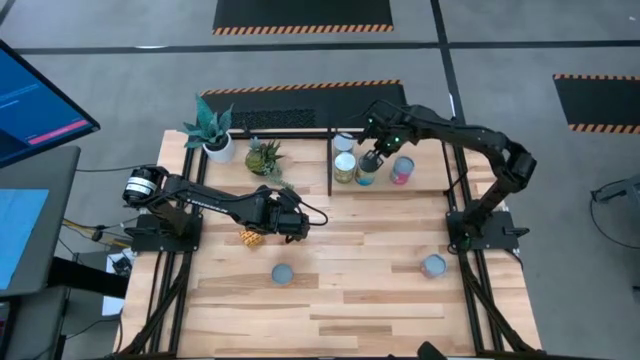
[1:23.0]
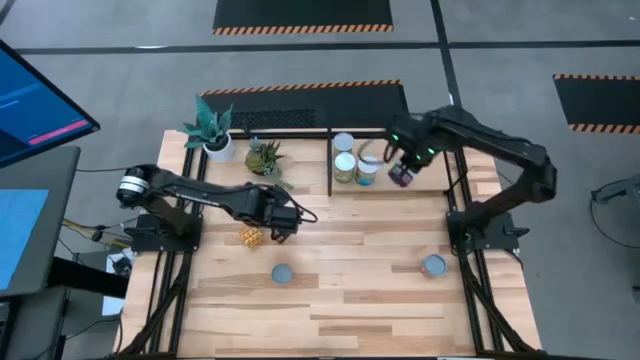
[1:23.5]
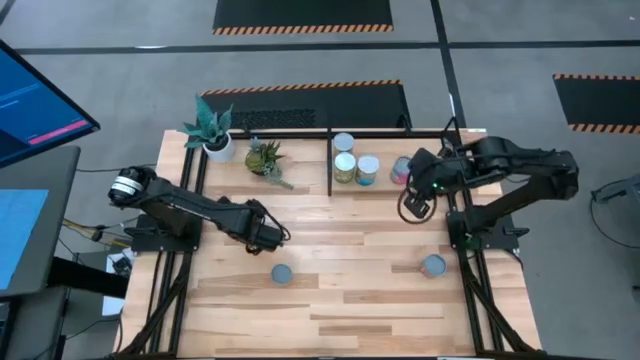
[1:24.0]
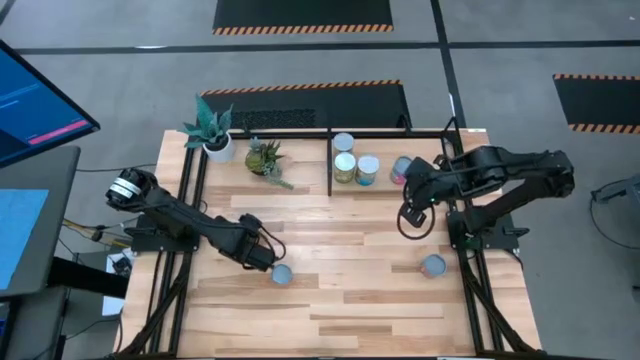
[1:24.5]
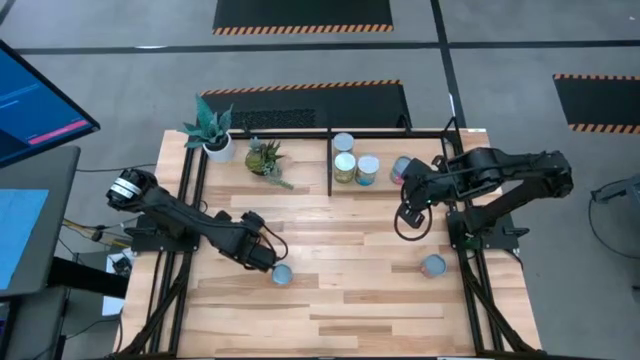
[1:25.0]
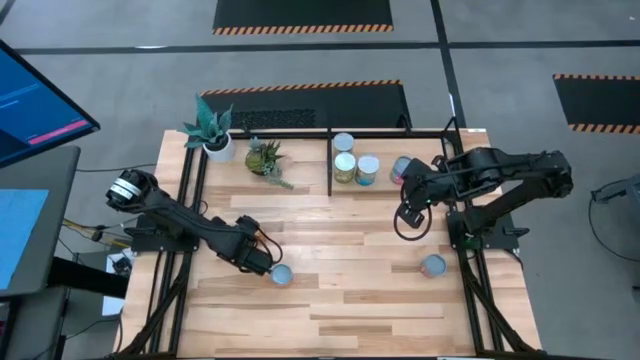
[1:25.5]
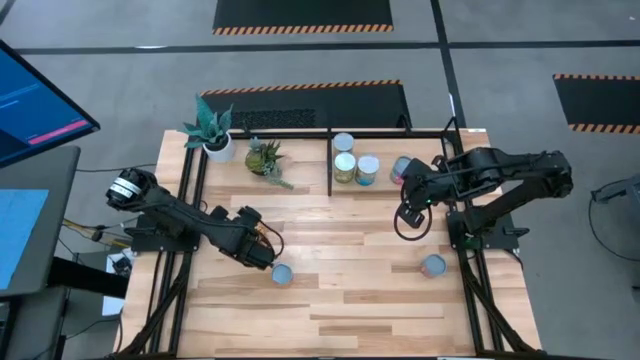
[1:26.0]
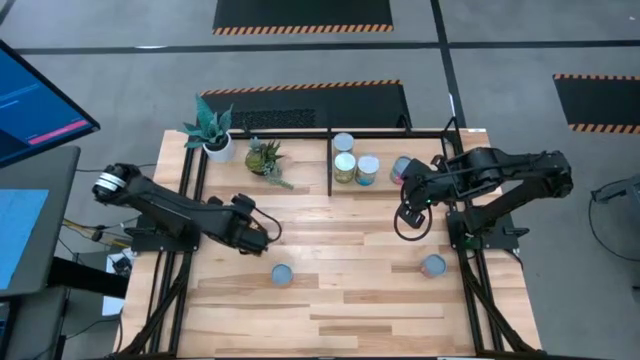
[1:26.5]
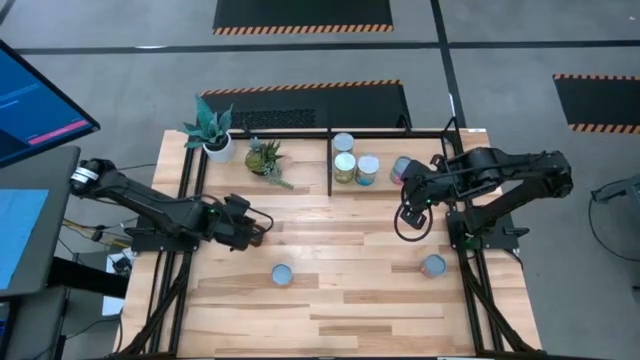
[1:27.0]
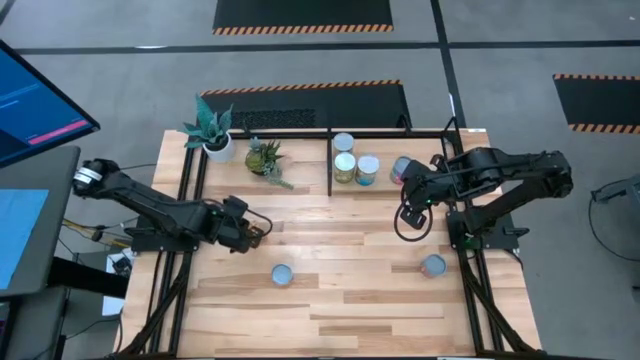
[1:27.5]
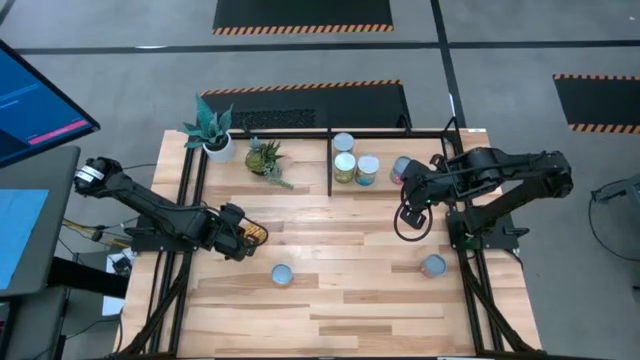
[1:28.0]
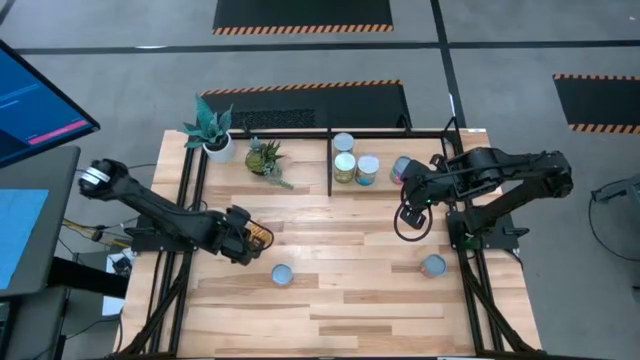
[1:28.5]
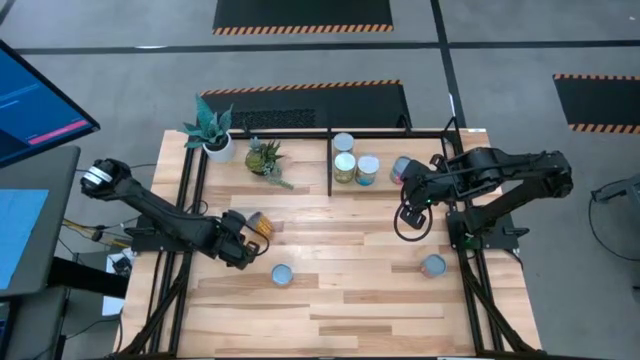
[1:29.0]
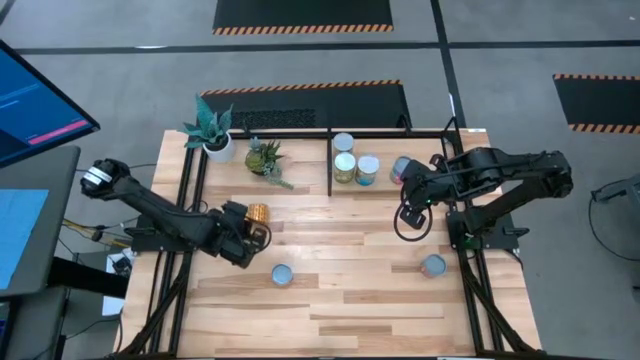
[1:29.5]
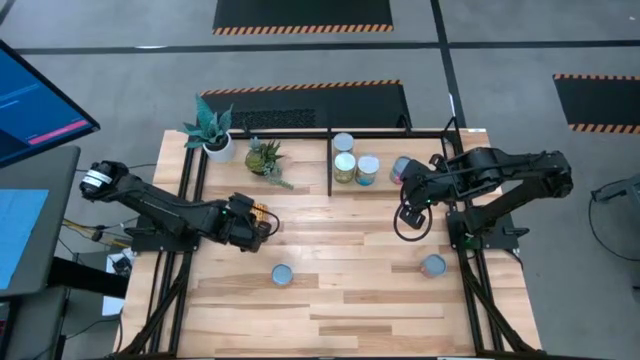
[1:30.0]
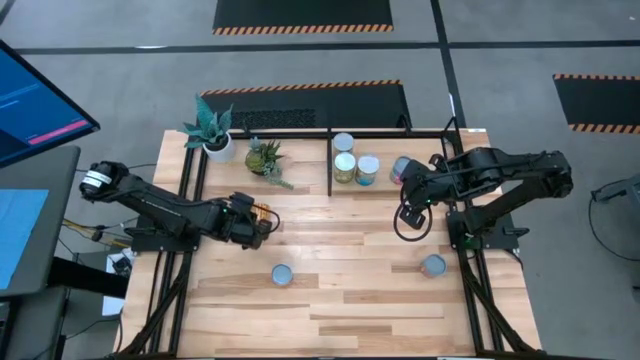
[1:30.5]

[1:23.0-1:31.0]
Task: Pick and place cans onto a shelf
Put the canned black beans on the shelf

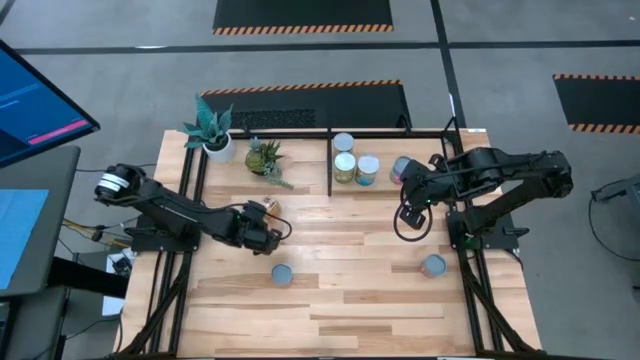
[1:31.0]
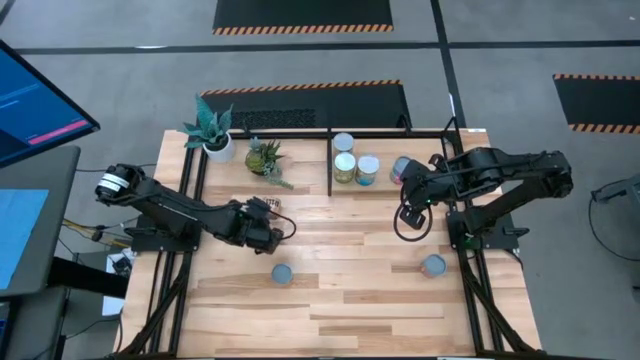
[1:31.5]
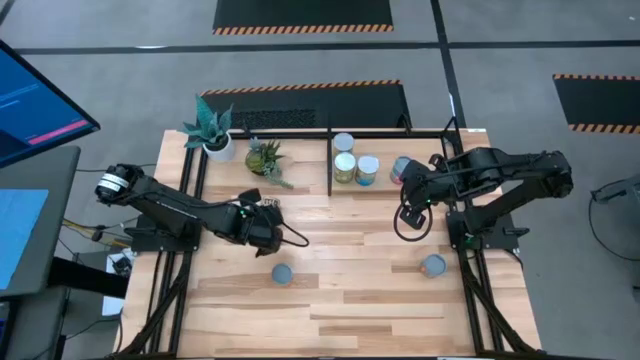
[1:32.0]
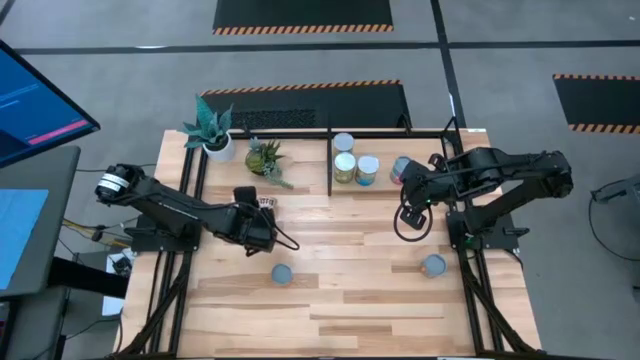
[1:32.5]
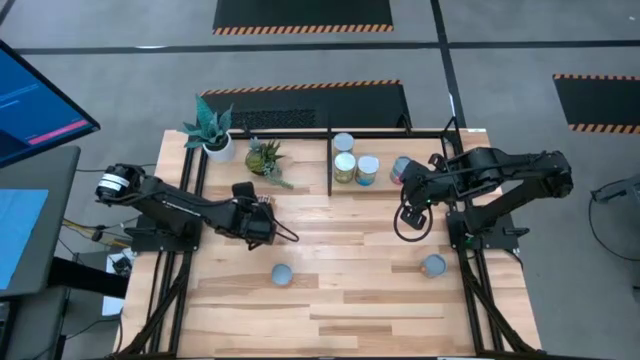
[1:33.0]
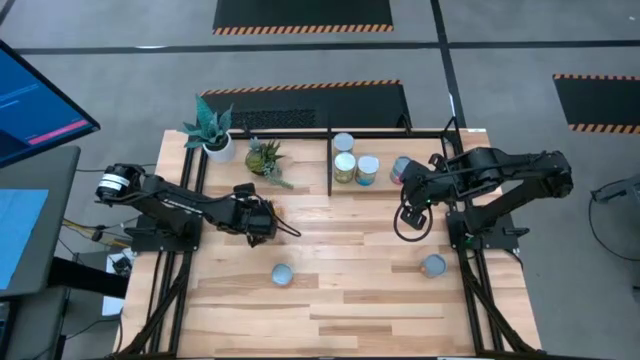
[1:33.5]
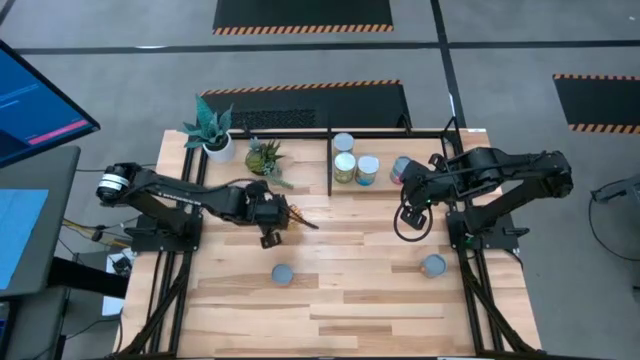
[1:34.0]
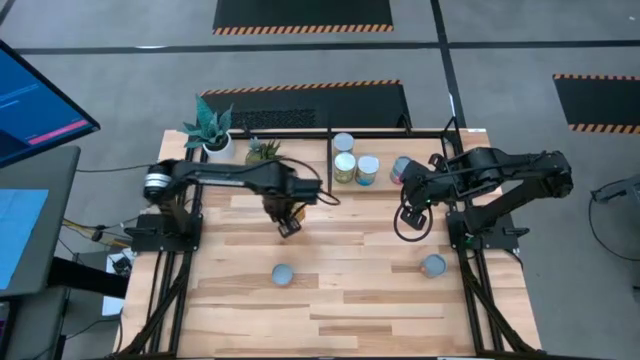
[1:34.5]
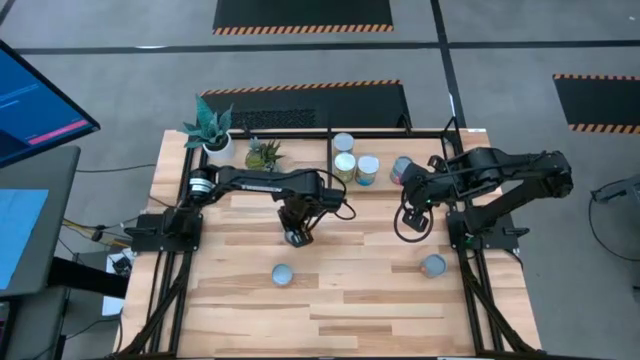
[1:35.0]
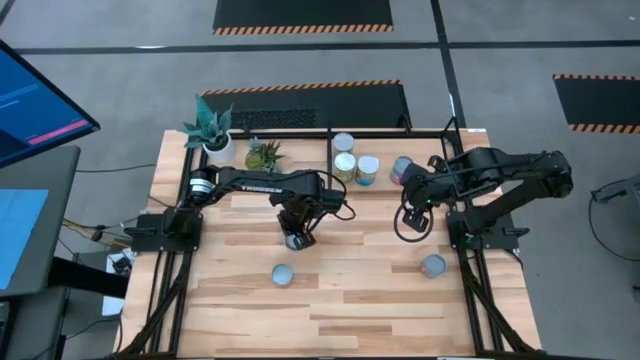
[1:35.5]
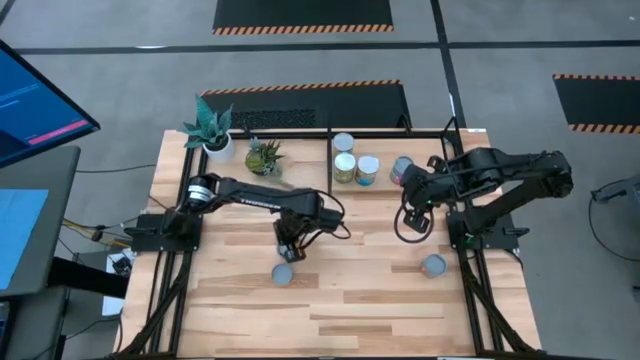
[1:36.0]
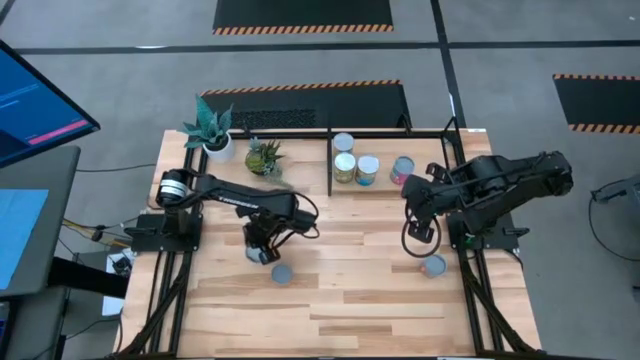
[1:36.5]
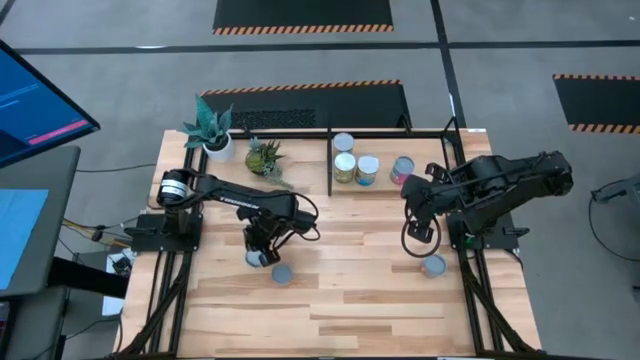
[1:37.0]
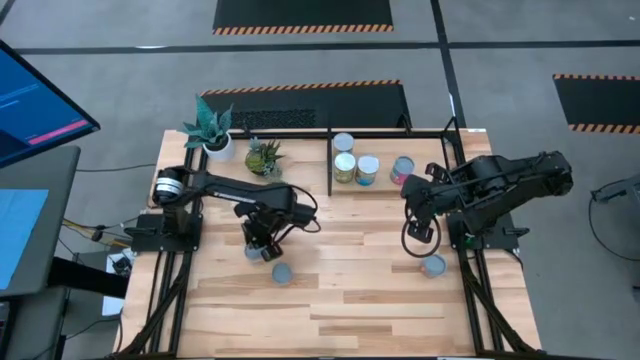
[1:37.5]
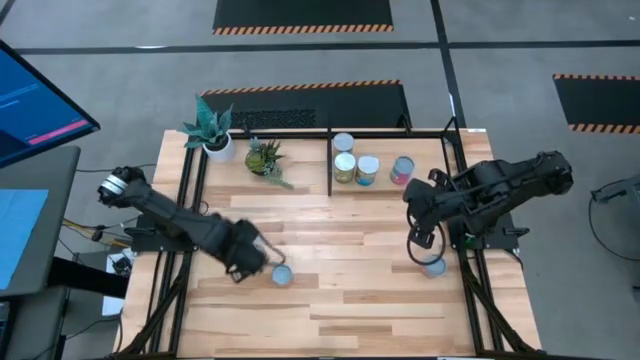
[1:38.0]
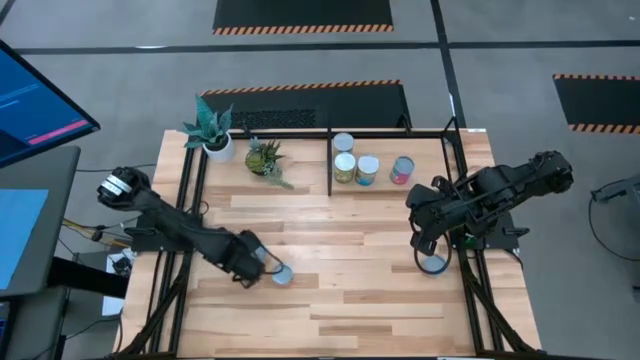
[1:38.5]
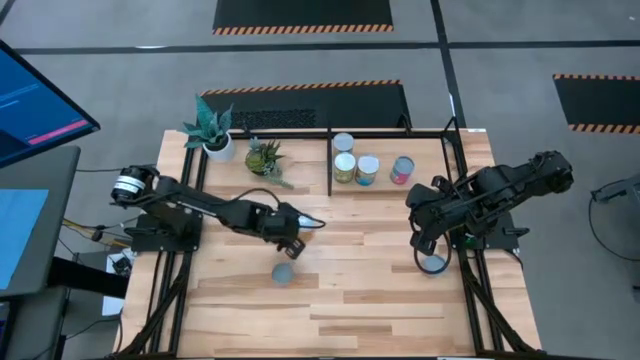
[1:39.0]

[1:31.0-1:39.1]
Adjust the canned black beans

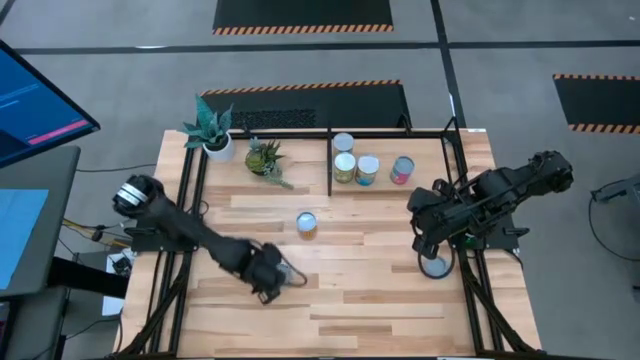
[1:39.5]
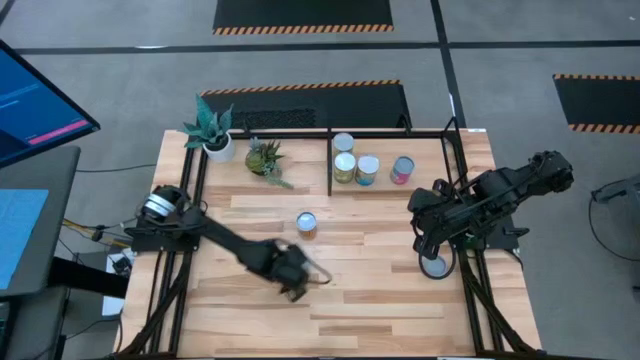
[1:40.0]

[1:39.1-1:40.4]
Move the canned pineapple to the center of the table

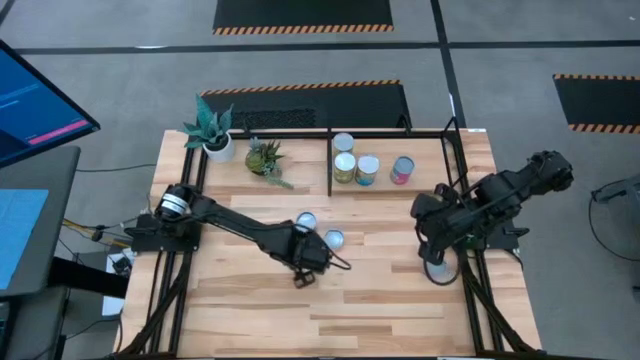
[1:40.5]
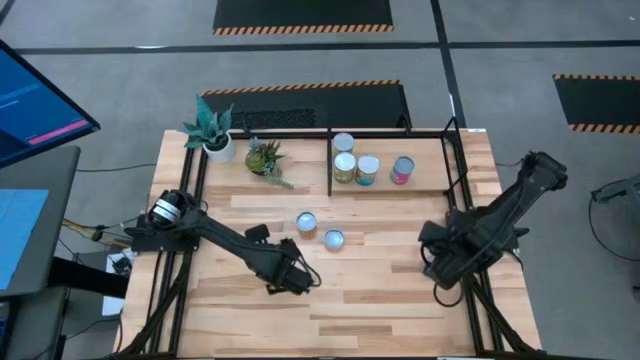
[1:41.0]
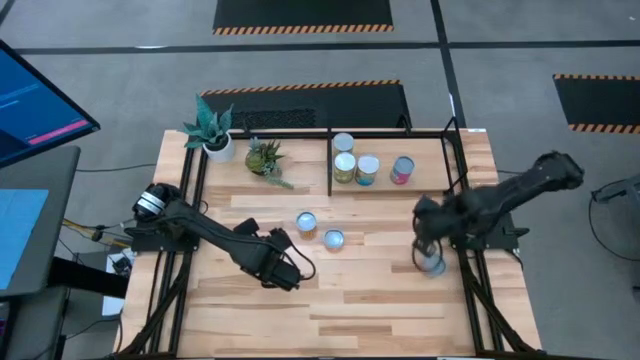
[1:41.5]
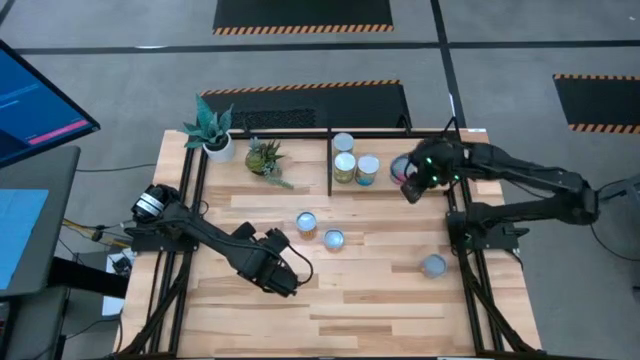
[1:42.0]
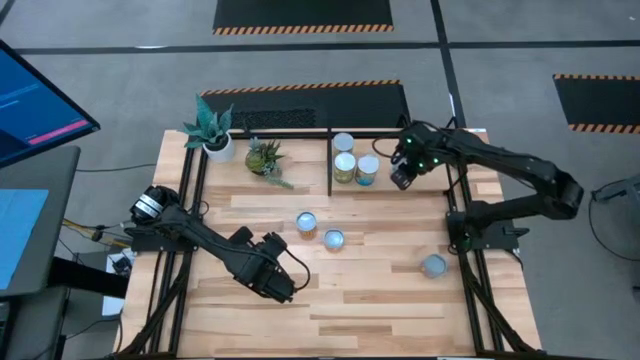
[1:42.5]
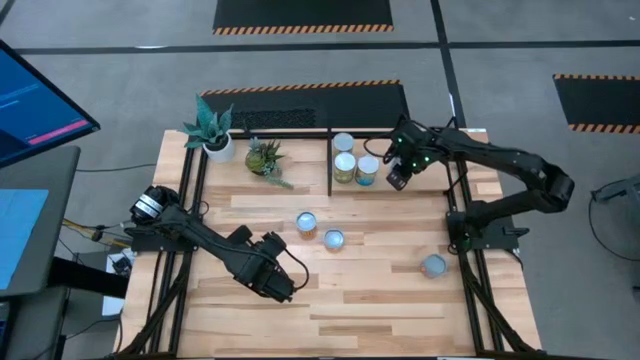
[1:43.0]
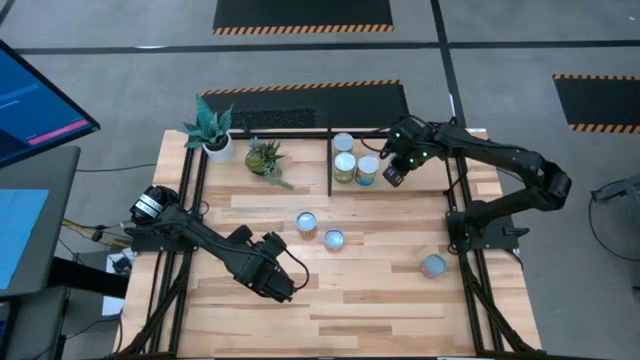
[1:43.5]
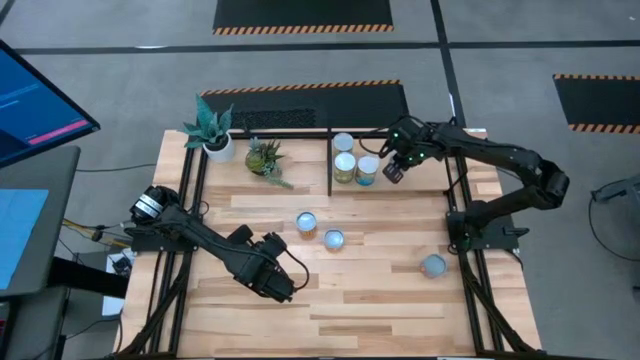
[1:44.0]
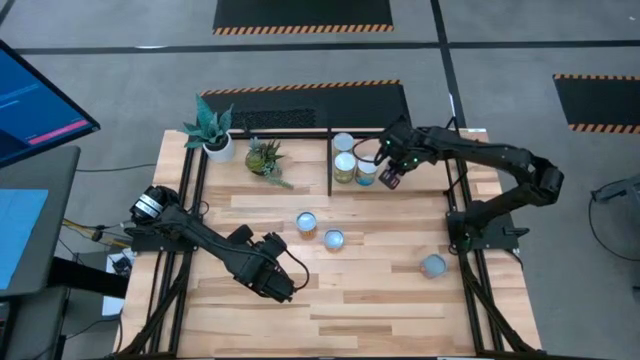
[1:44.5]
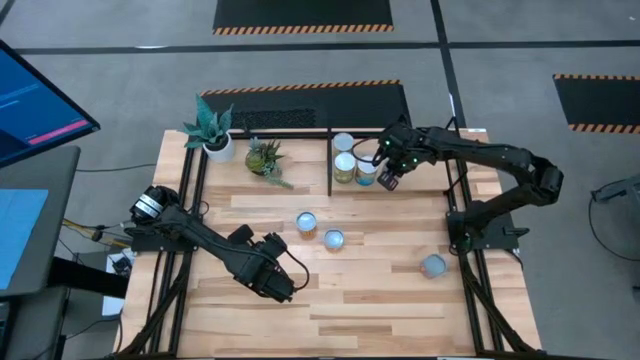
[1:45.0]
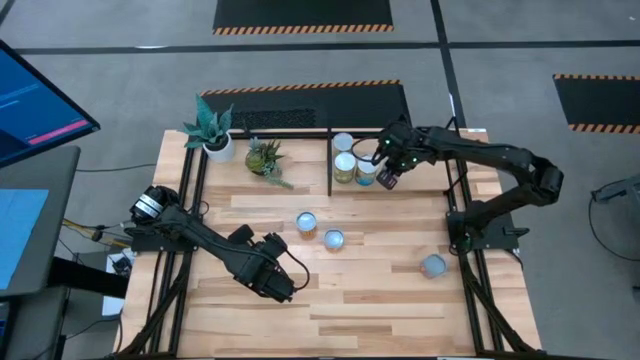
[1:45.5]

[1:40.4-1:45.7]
Adjust the canned chicken soup on the shelf
